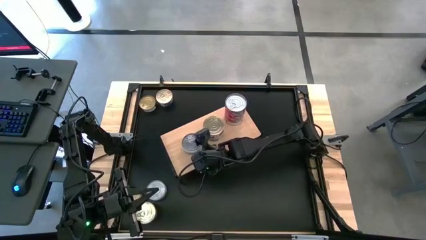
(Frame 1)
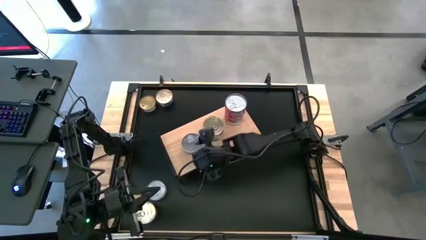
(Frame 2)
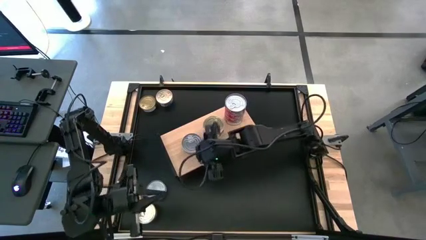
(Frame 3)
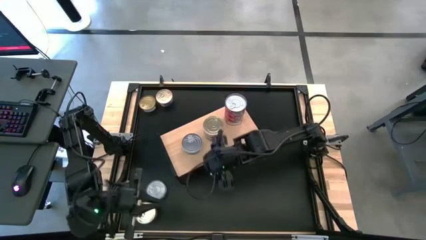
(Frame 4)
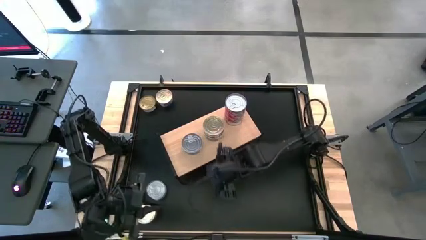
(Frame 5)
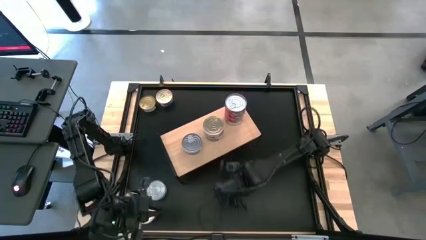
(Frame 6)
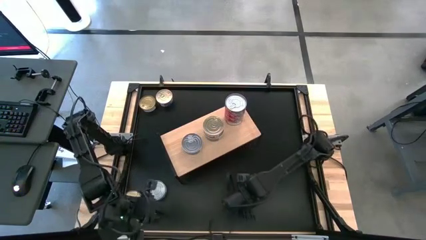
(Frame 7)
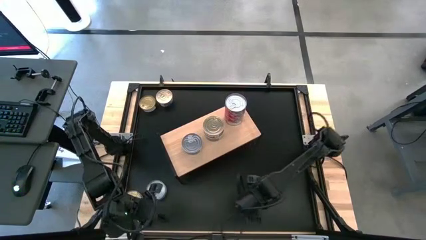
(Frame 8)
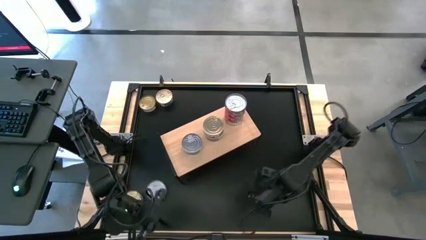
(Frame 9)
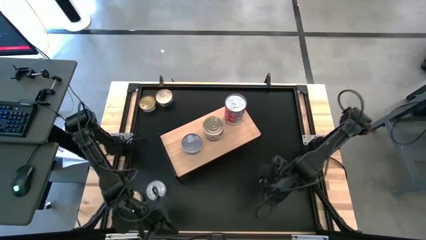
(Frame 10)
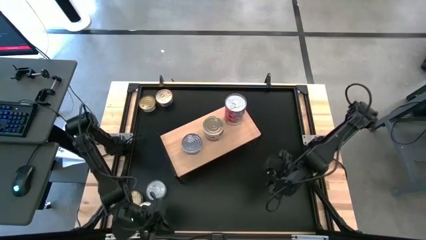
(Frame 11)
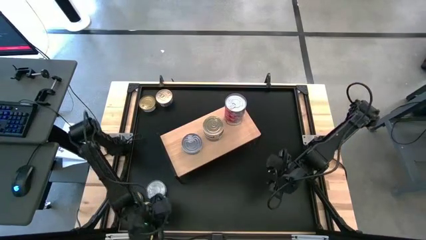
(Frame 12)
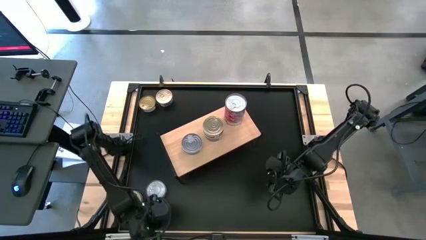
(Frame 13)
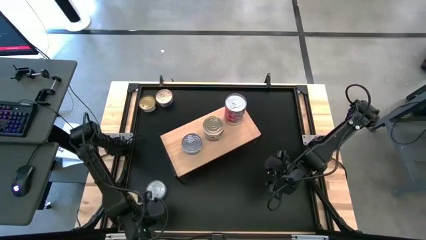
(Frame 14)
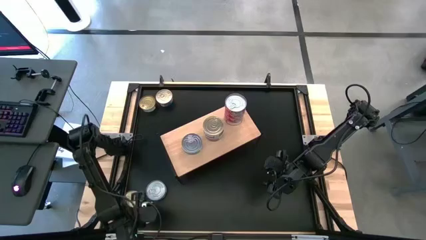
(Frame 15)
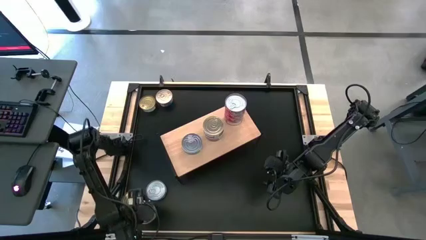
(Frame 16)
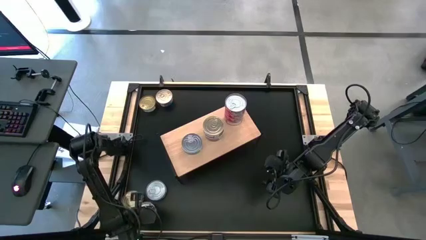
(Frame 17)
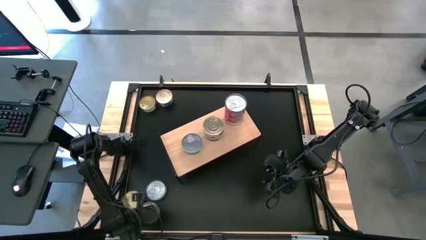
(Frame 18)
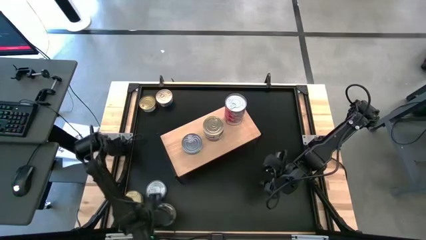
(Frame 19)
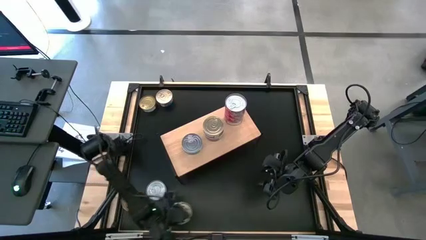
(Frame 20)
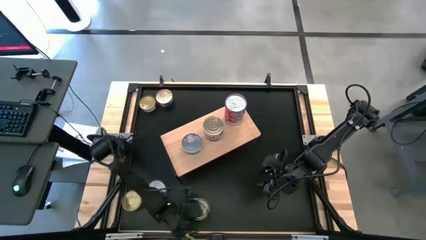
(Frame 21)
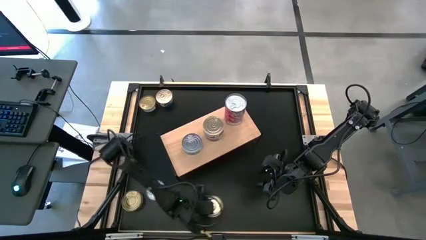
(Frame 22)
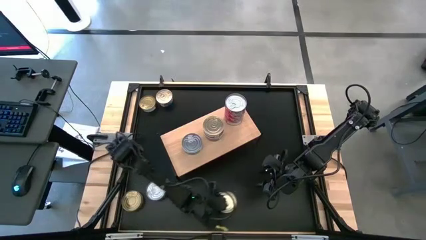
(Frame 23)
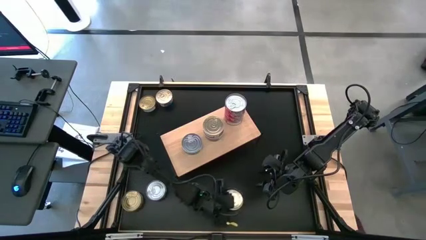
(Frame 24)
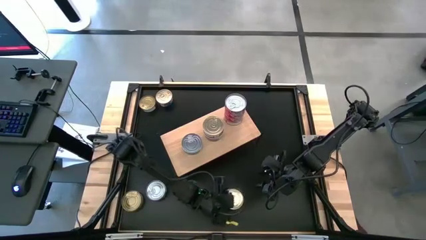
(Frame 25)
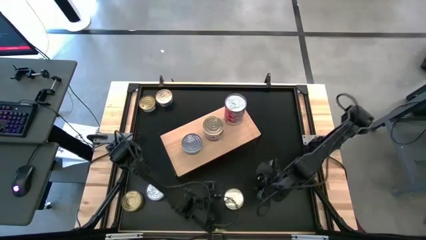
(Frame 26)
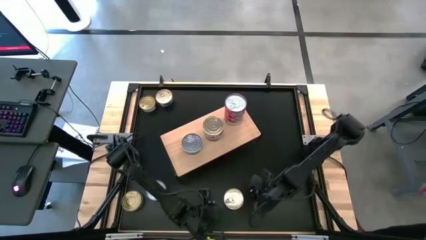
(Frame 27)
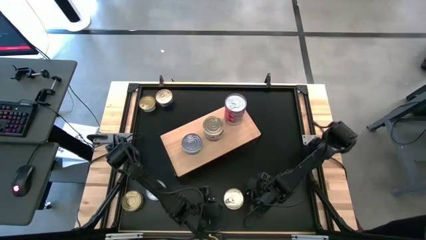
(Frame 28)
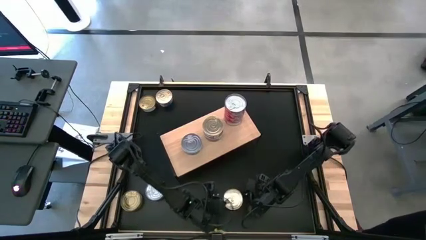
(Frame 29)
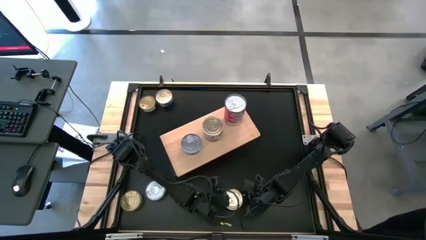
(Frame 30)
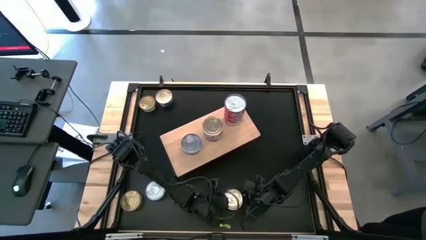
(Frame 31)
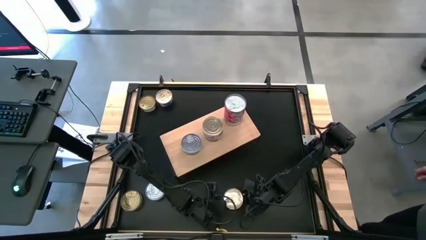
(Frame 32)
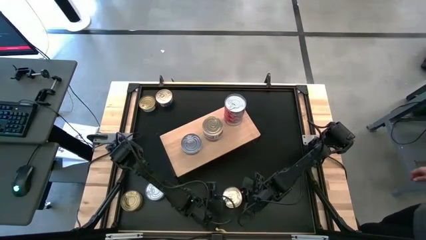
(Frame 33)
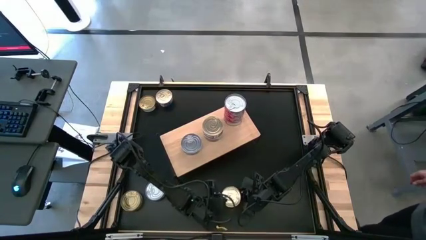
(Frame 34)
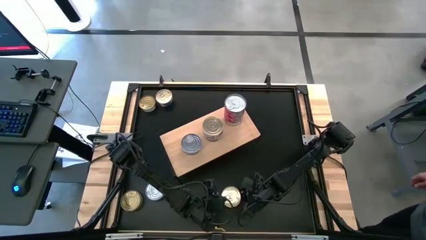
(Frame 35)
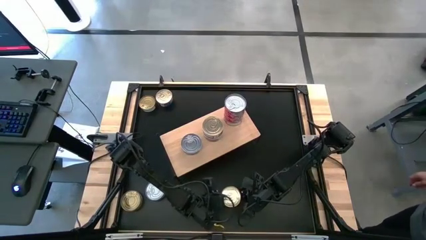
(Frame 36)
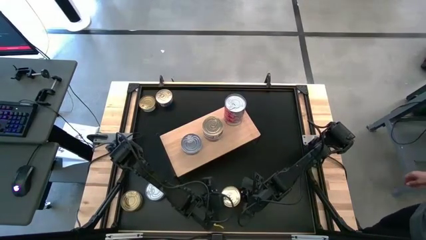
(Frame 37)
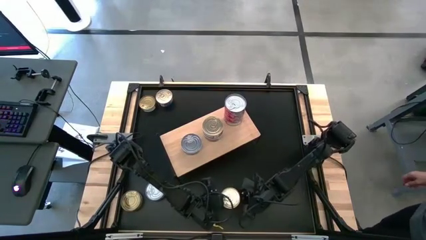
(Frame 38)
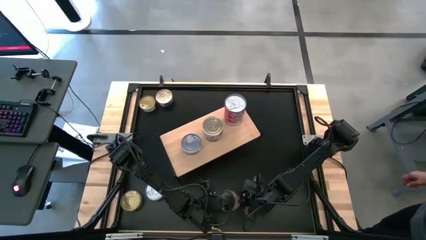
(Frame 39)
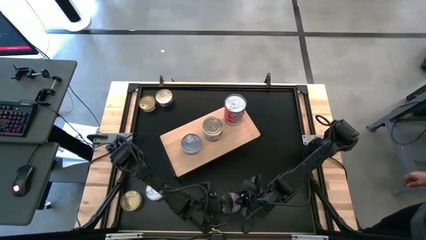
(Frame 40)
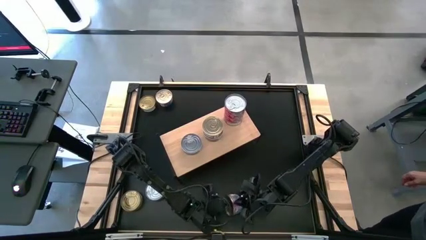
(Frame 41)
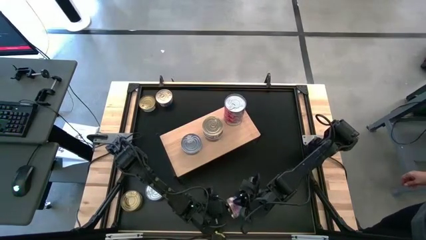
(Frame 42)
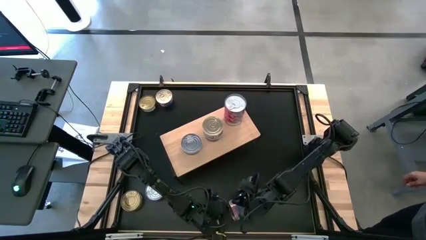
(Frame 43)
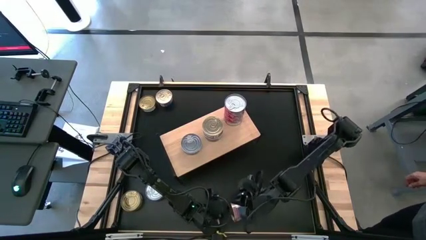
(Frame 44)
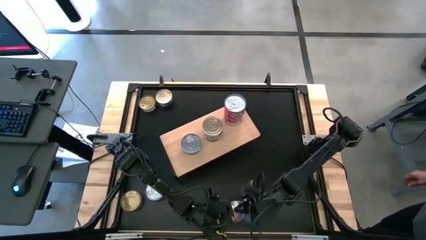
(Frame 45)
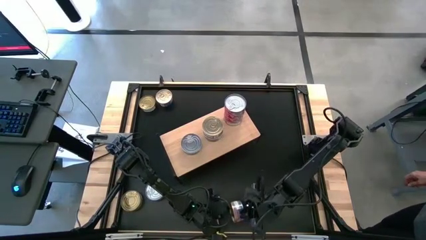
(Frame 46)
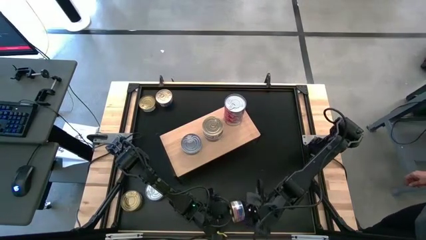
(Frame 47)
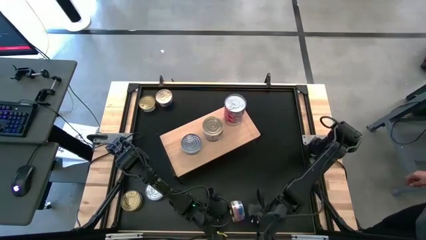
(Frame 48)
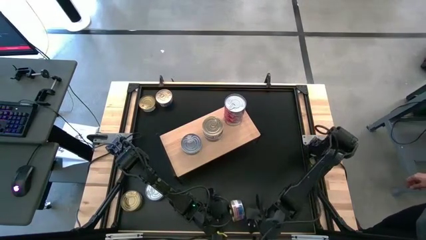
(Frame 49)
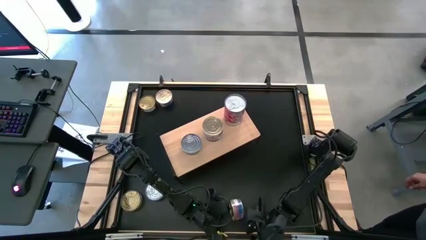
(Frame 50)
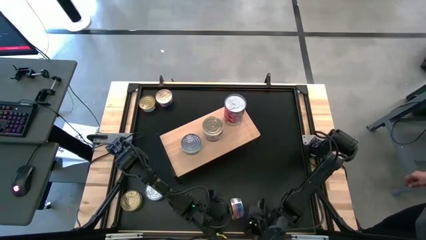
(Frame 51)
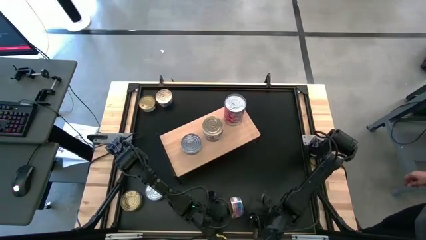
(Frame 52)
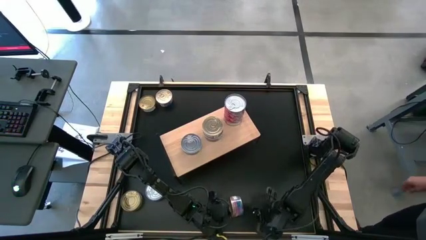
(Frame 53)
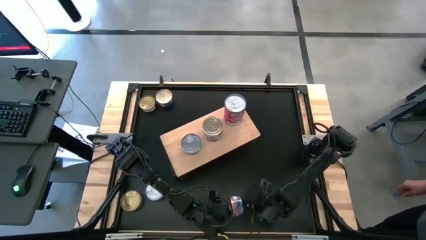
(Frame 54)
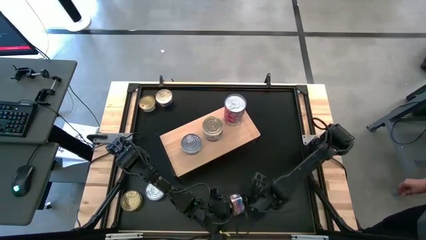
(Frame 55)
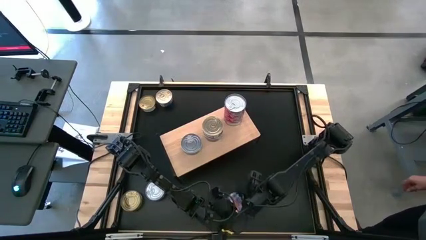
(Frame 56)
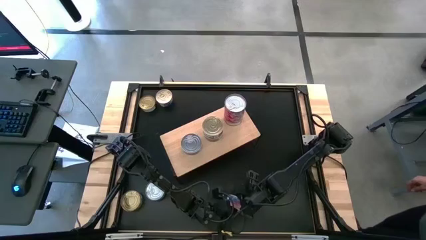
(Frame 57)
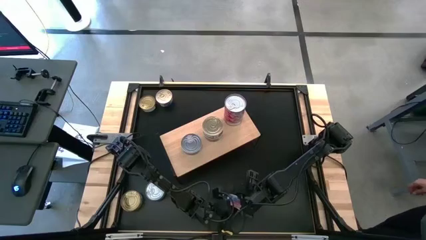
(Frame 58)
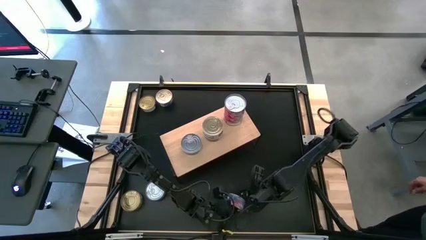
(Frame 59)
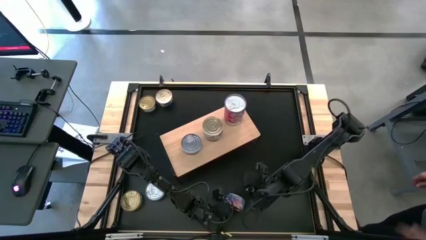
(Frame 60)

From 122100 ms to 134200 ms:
Task: Stack canned seafood by type on shelf
Stack the blue tuna on the top of the other blue tuna cans on the shelf

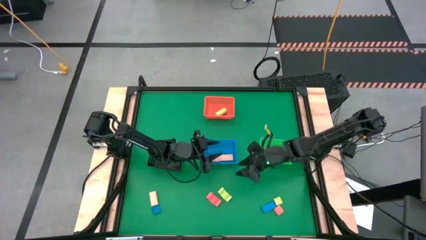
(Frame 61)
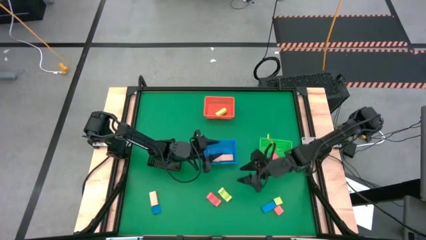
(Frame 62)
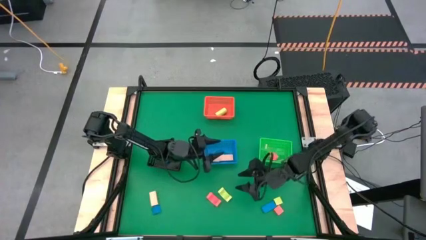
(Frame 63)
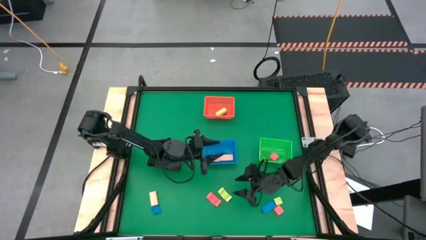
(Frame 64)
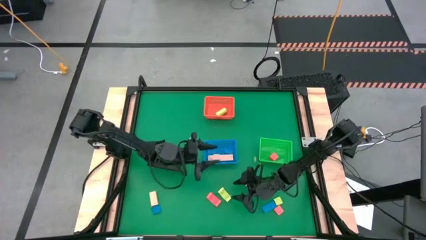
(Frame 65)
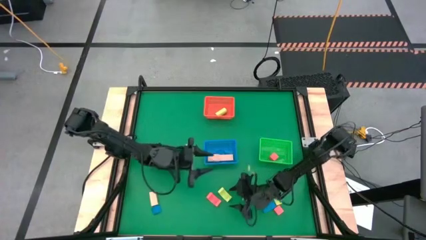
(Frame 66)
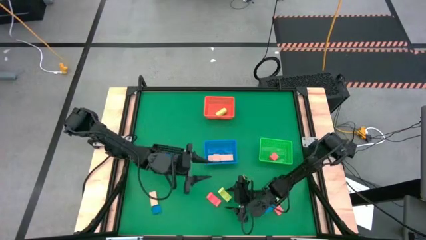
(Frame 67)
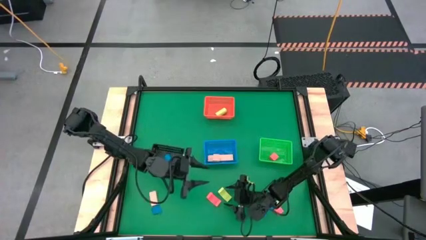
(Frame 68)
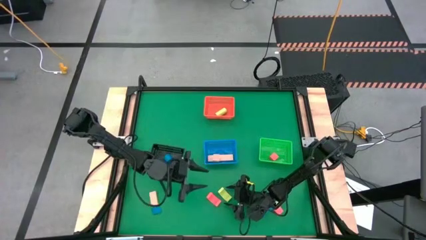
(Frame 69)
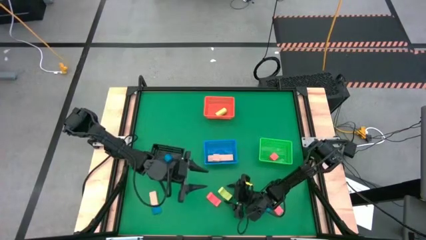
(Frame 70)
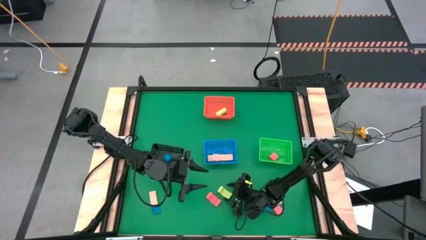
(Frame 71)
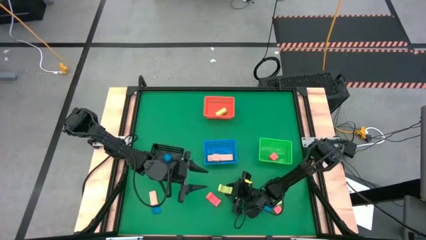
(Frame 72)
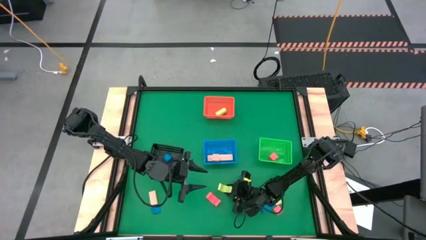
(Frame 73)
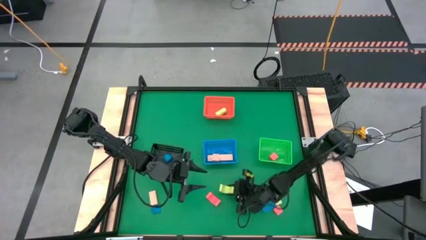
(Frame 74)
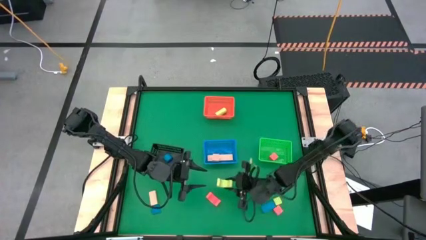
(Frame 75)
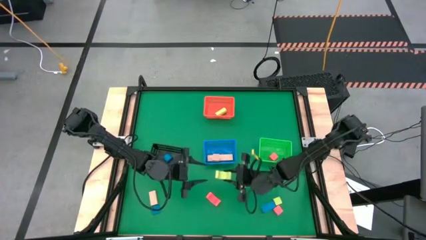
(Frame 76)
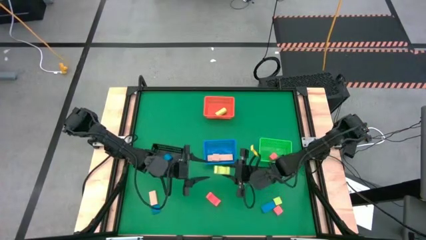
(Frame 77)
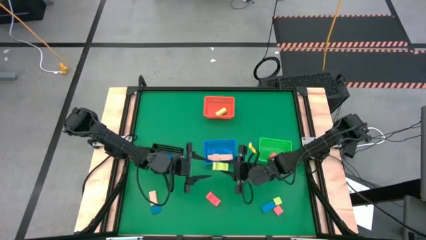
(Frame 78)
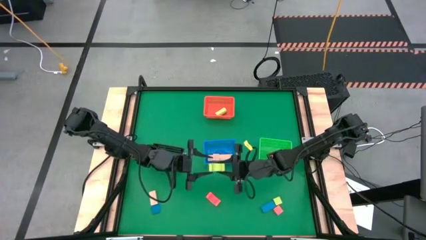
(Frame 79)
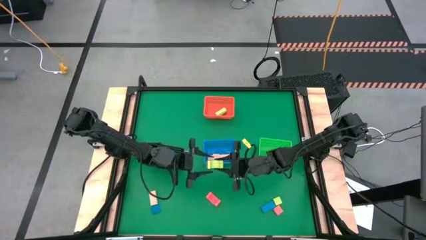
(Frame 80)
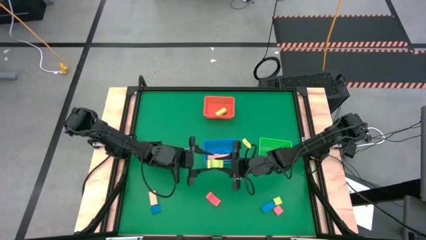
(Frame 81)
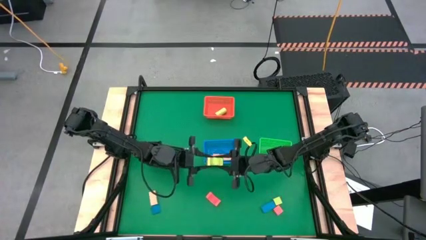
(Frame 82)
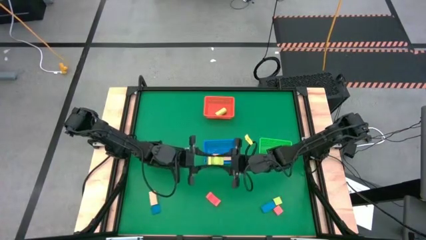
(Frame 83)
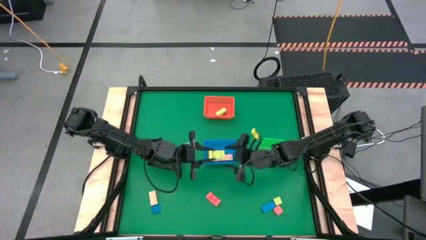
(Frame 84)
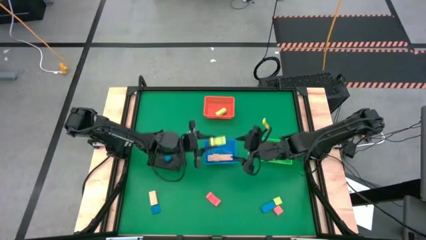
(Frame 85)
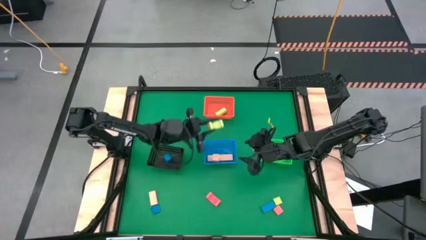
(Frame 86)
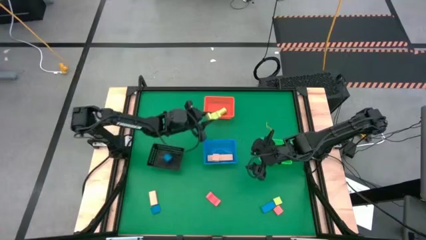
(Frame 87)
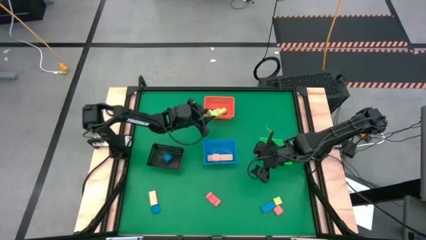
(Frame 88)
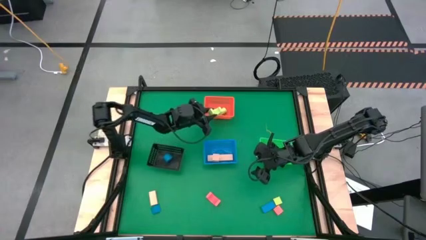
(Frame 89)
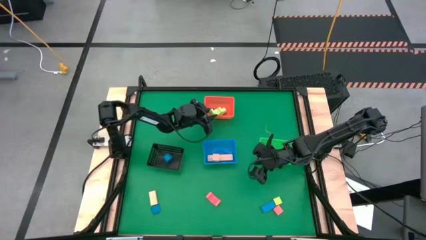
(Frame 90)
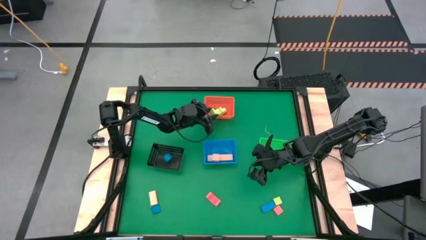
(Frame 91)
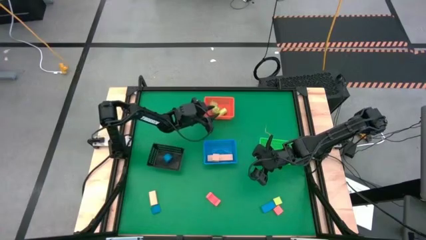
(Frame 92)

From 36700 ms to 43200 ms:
Task: Sort & place blocks by color
Put the left green arch block into the red bin
